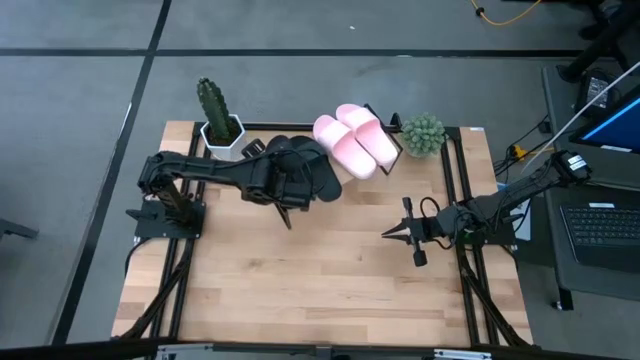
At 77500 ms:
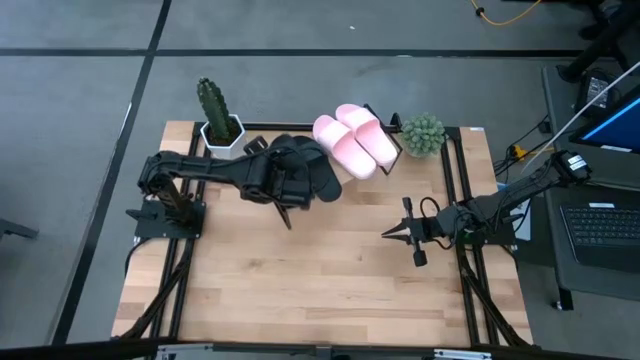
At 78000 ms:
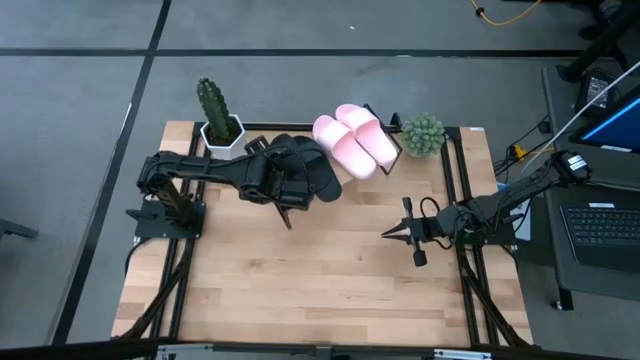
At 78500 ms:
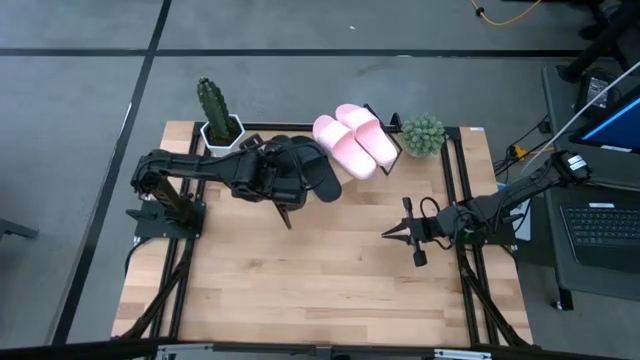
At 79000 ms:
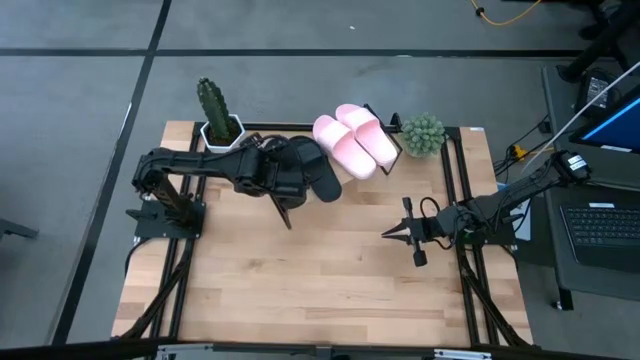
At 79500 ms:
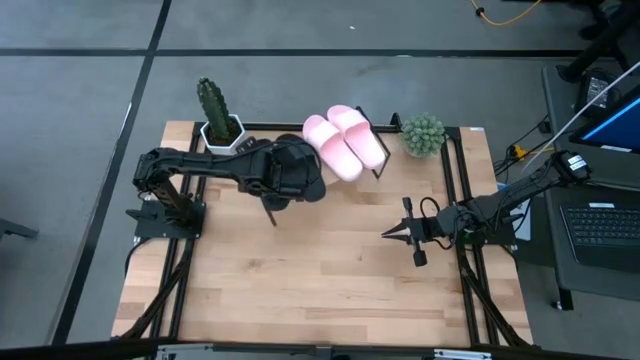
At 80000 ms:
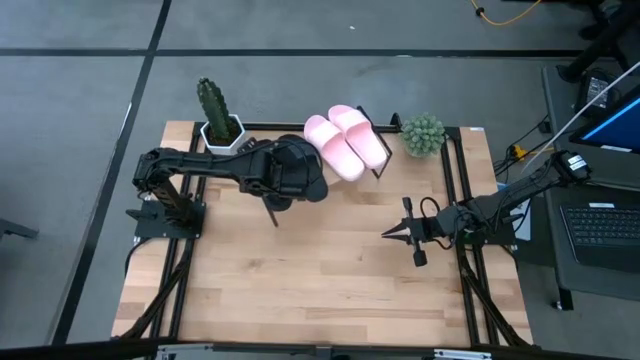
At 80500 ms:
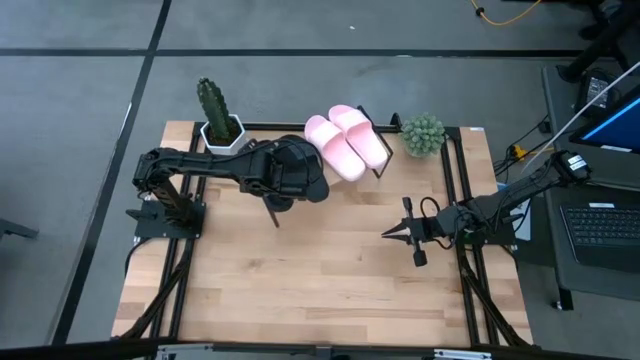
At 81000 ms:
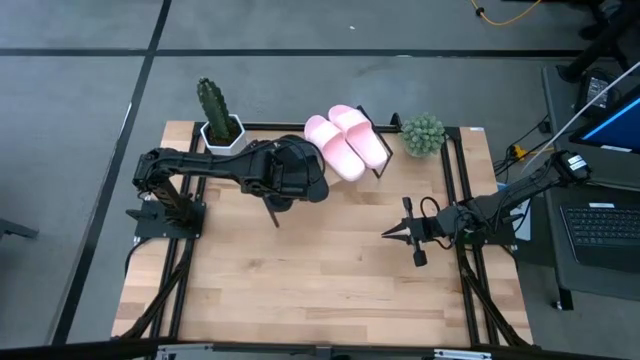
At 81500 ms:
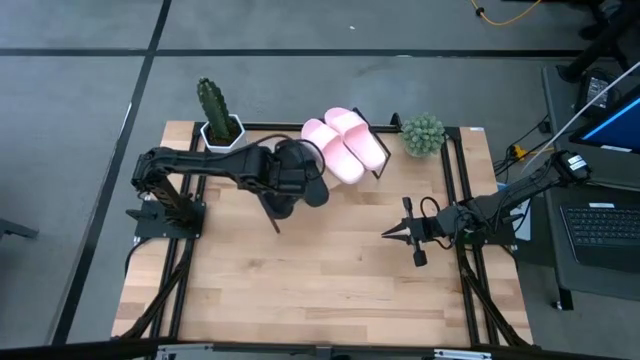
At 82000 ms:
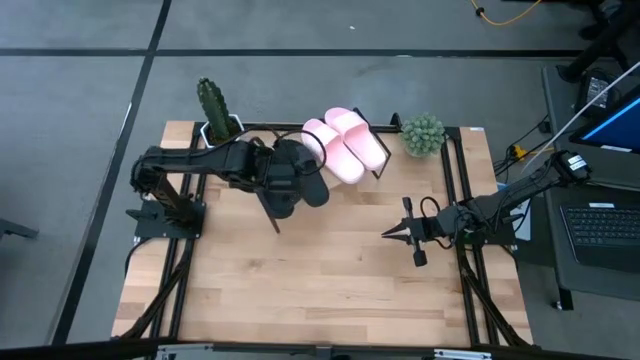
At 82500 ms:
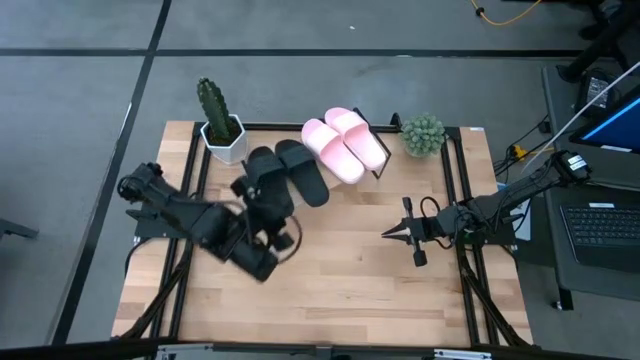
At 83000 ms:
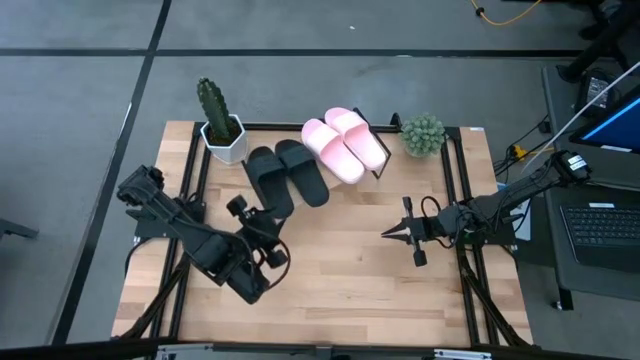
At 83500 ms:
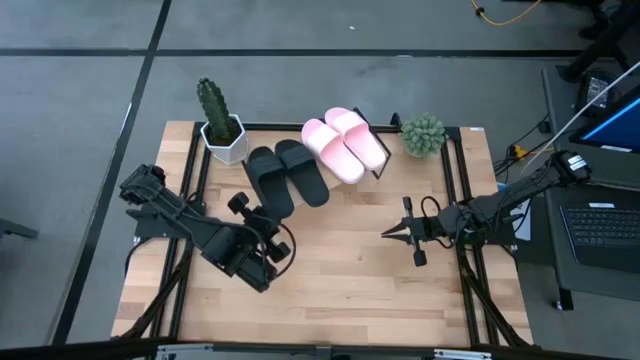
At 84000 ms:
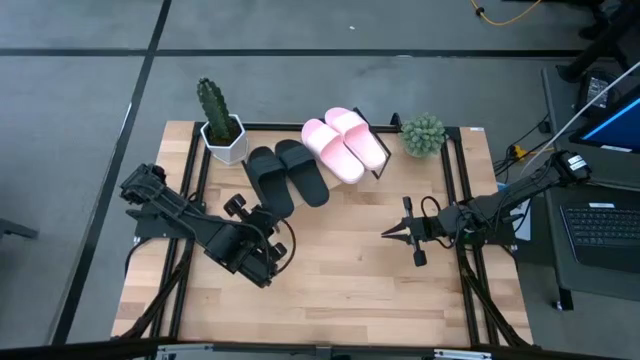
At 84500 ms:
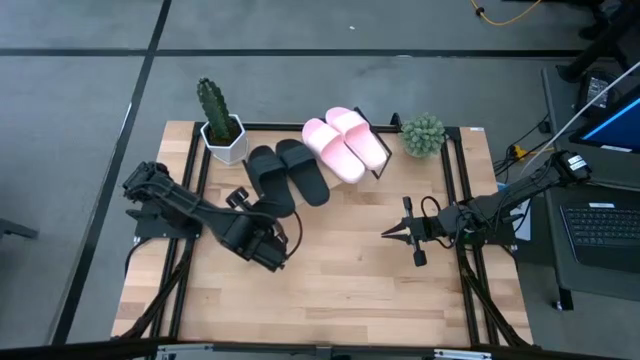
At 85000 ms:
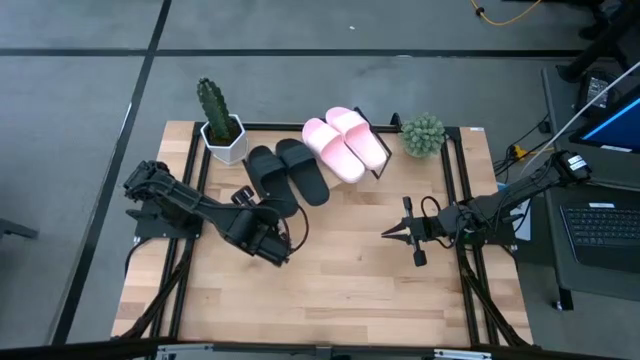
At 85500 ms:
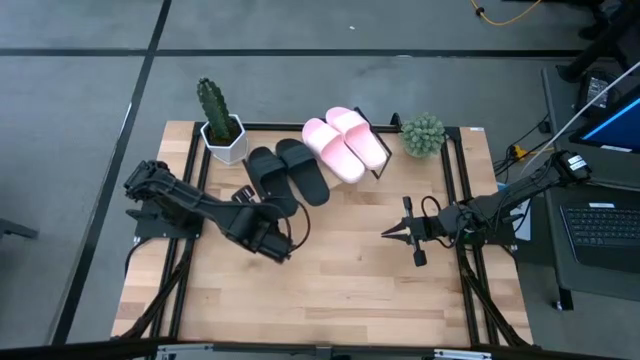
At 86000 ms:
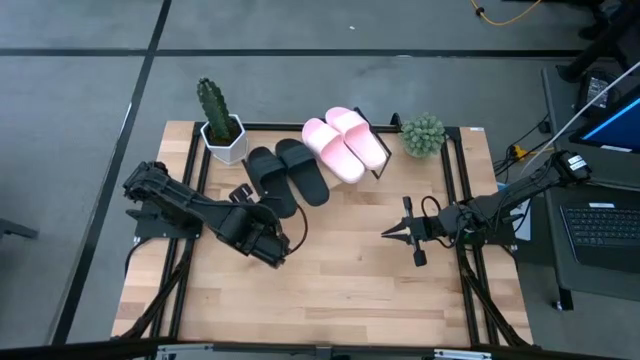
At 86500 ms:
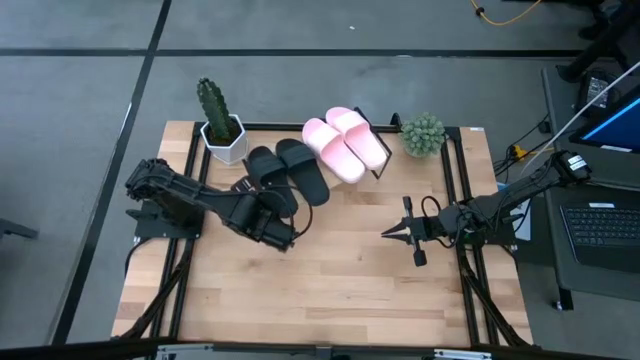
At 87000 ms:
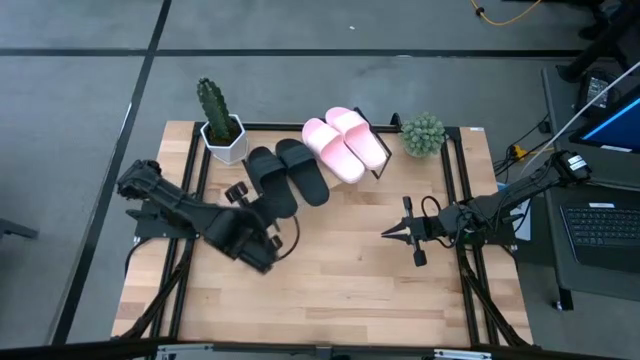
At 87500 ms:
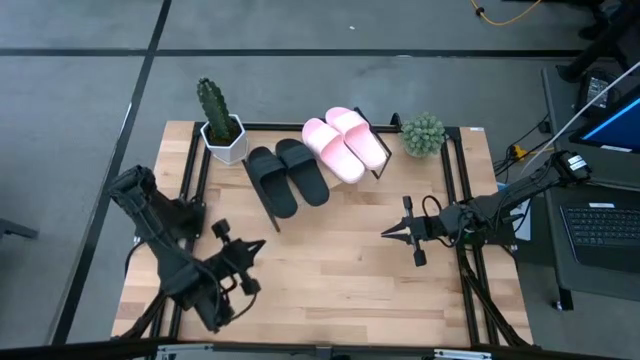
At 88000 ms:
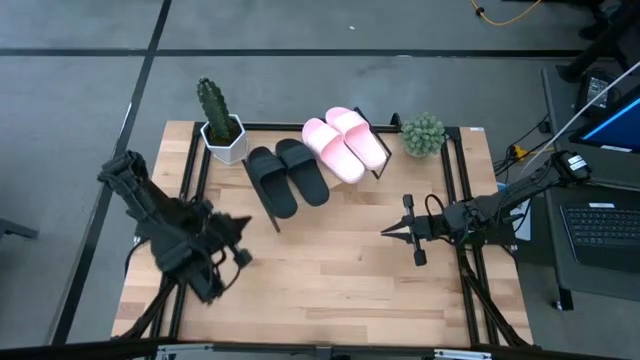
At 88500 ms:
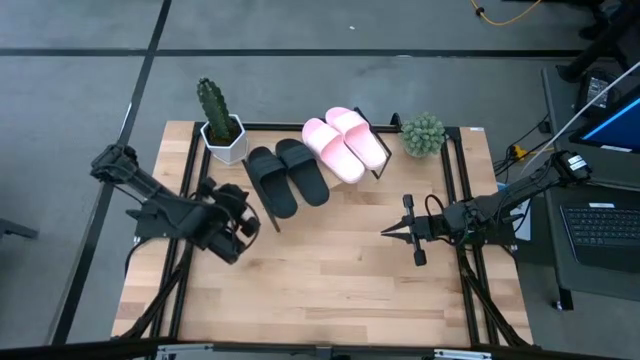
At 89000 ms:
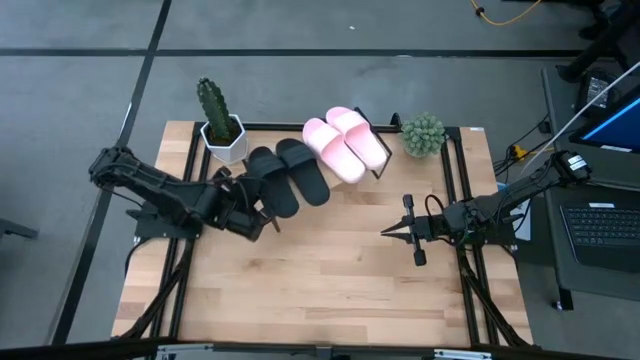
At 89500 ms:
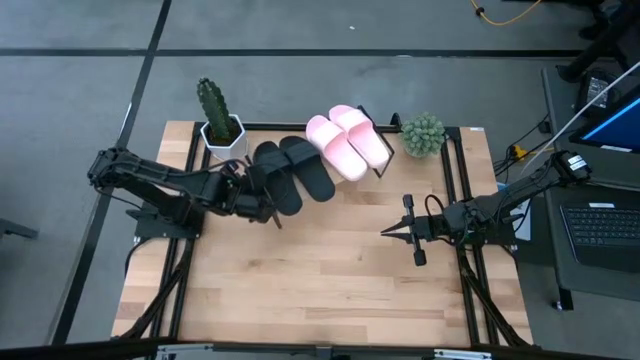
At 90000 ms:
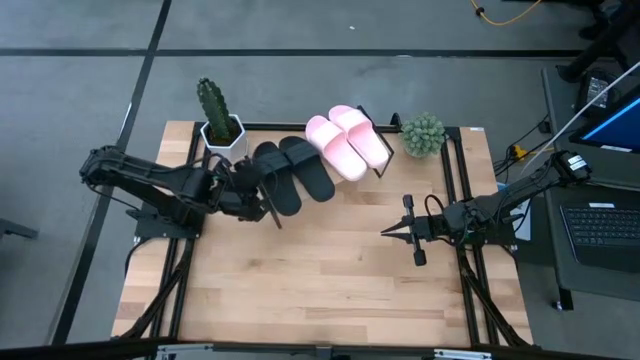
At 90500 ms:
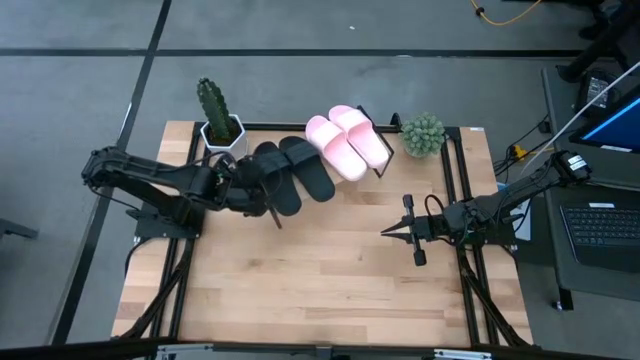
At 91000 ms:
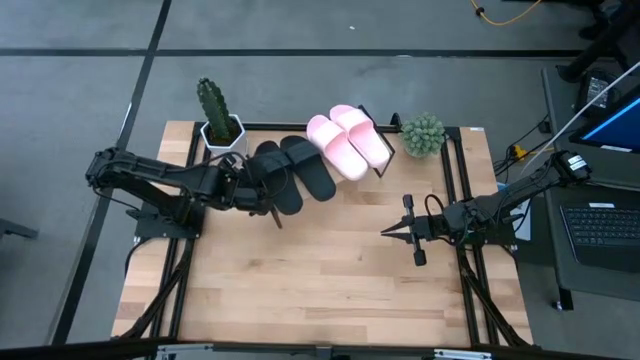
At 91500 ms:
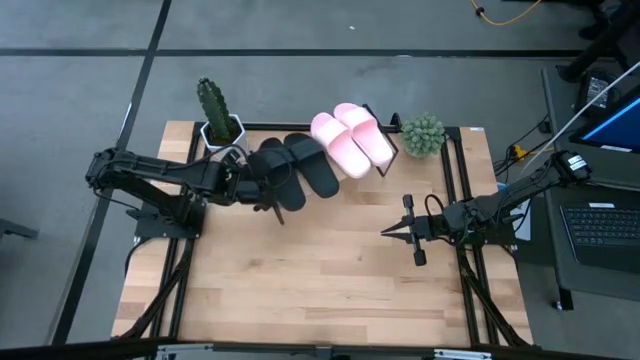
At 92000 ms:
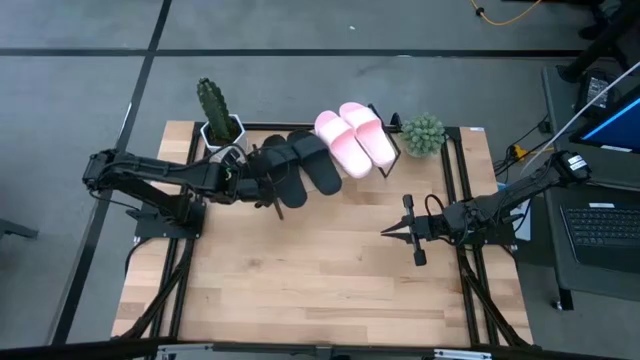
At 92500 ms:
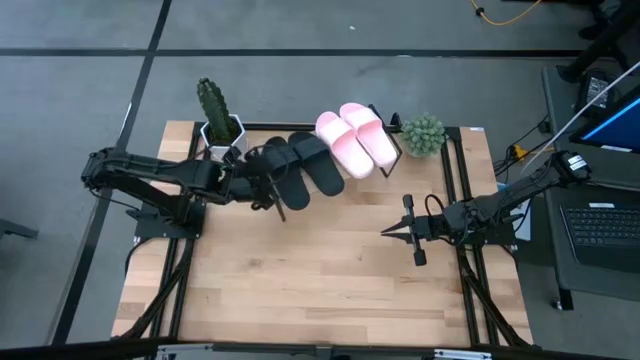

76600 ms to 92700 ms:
Task: Pick and place slides into the shelf
Put the black slides on the shelf

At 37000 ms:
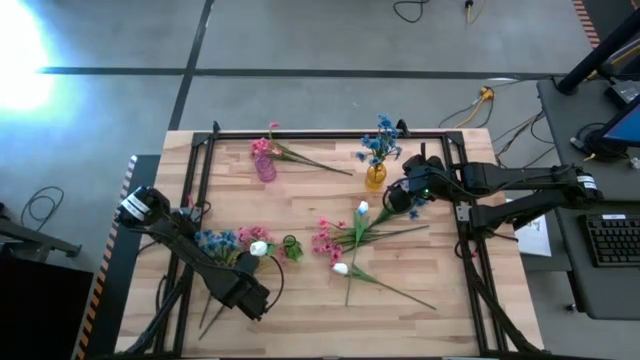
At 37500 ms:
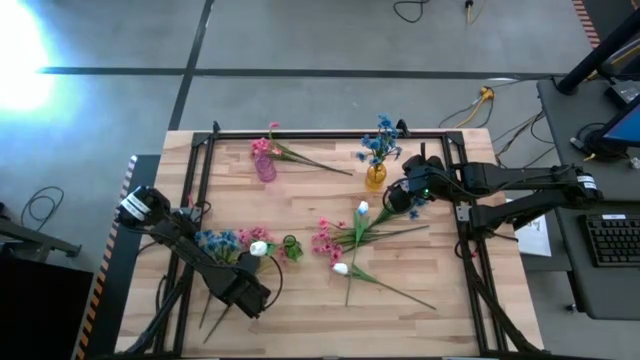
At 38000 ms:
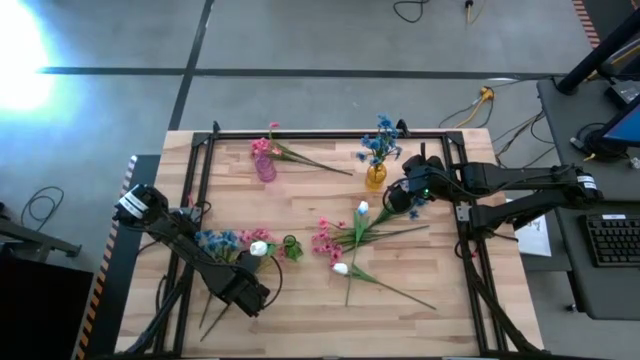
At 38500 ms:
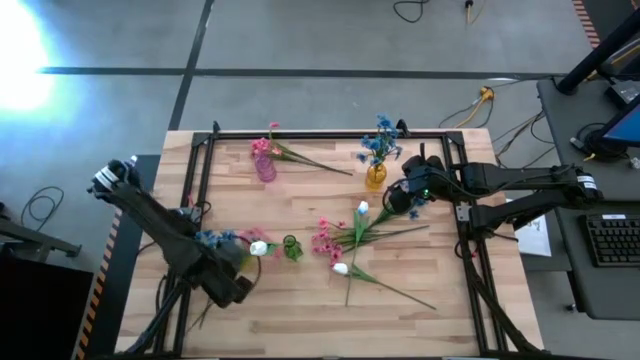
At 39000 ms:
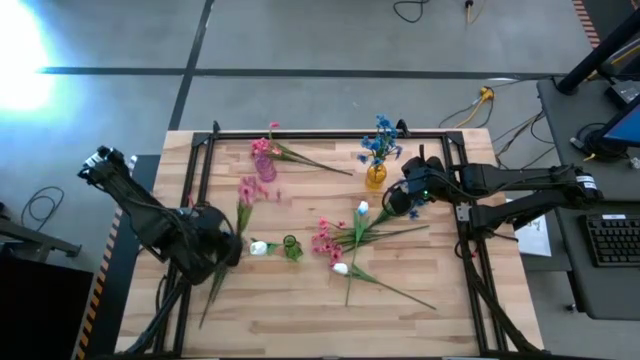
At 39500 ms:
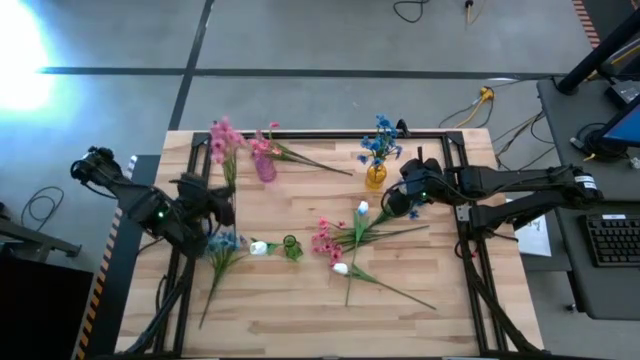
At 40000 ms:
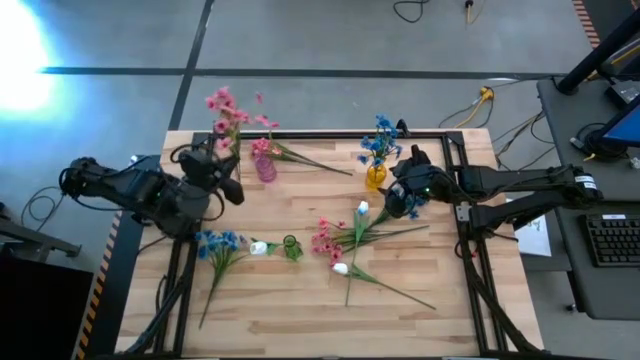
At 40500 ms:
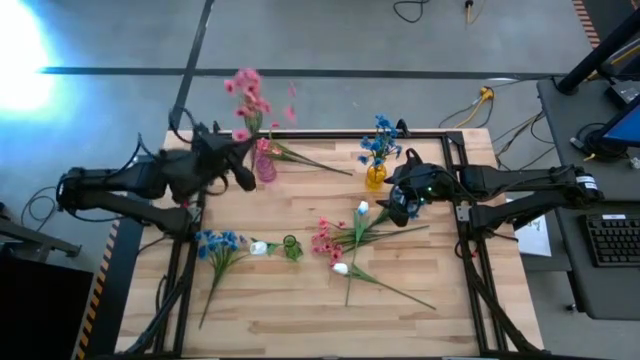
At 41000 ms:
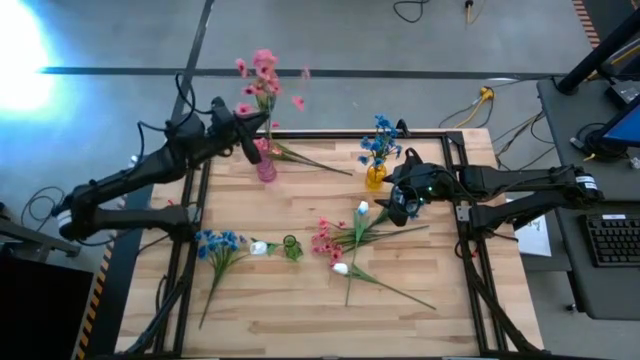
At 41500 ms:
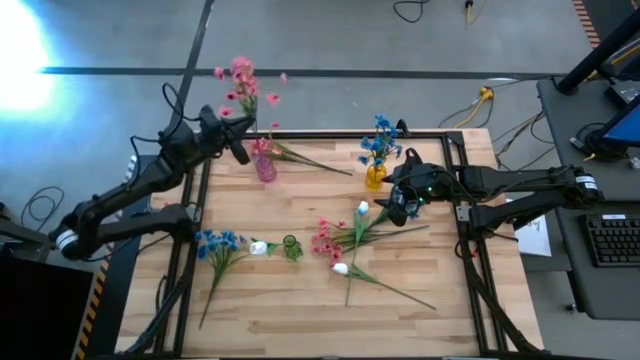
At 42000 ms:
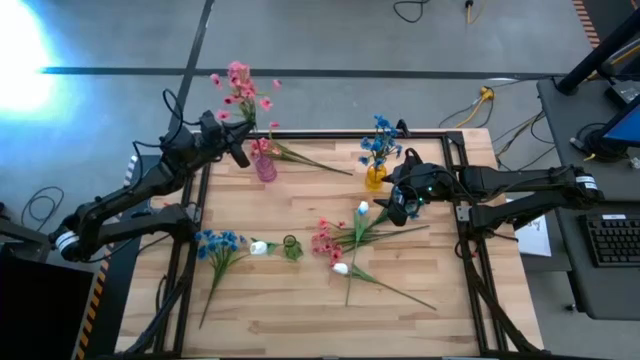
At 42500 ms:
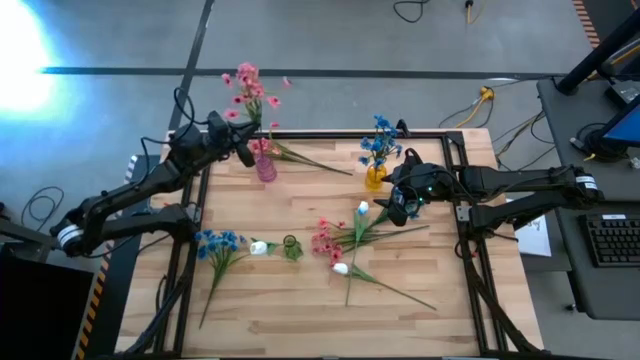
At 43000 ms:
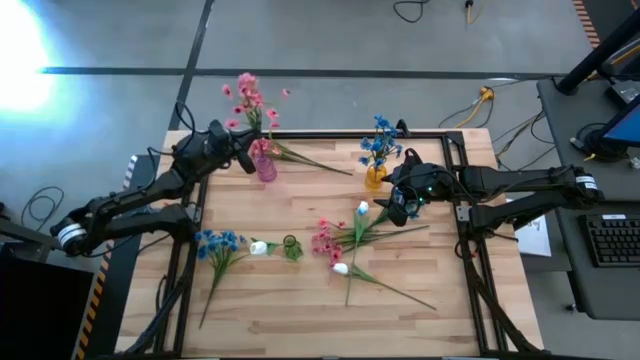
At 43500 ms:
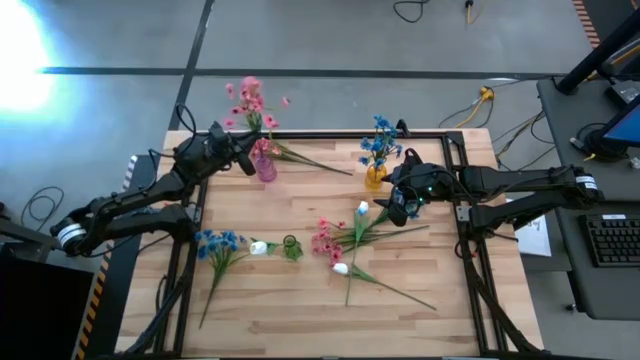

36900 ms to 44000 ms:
Task: Sort flowers into vase by color
Put the bottom left pink flowers into the pink vase
